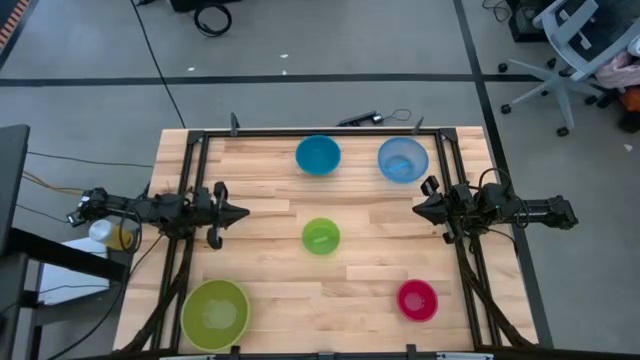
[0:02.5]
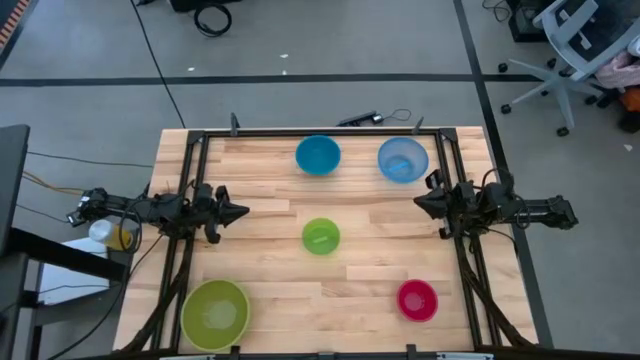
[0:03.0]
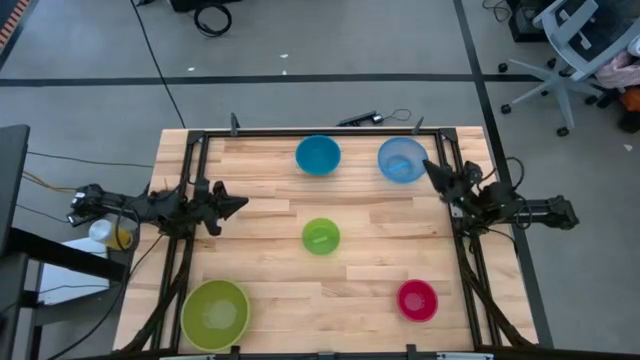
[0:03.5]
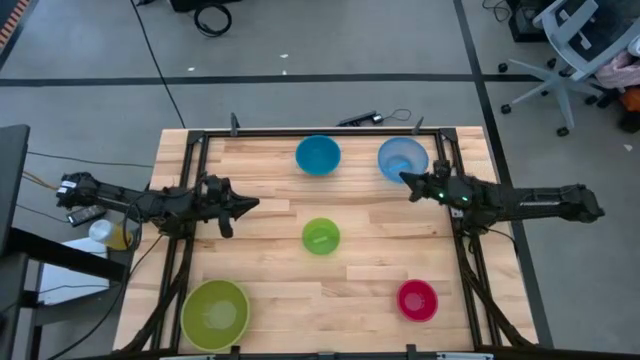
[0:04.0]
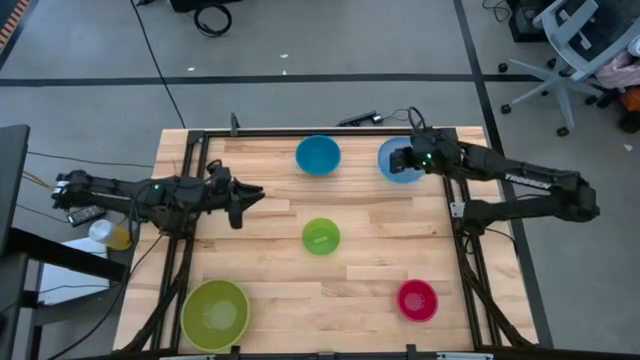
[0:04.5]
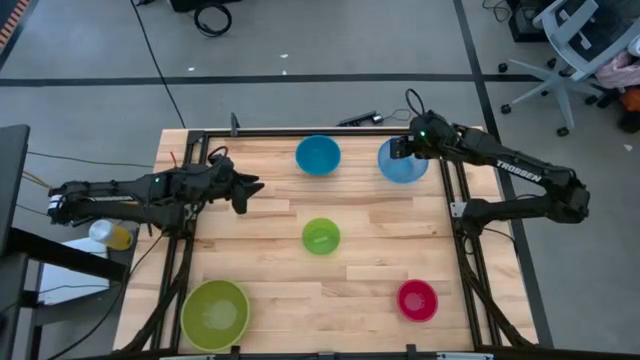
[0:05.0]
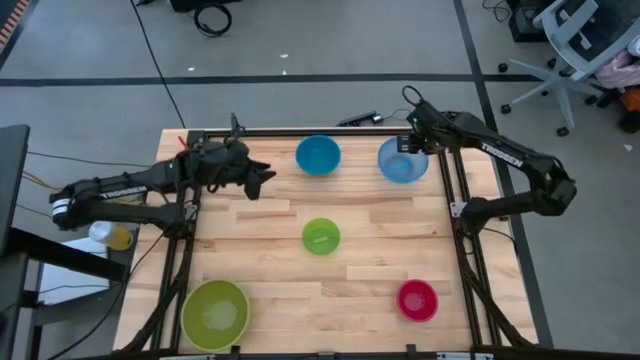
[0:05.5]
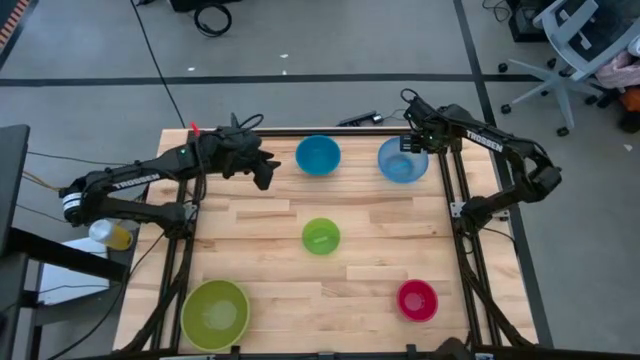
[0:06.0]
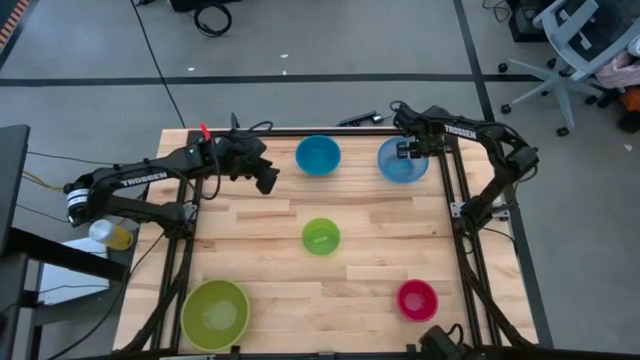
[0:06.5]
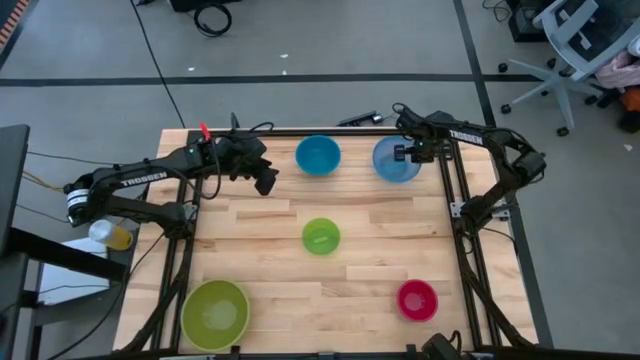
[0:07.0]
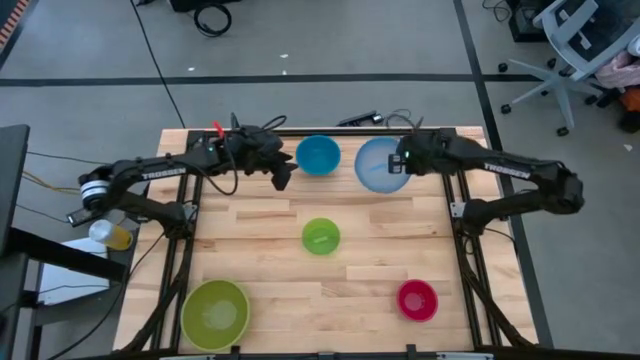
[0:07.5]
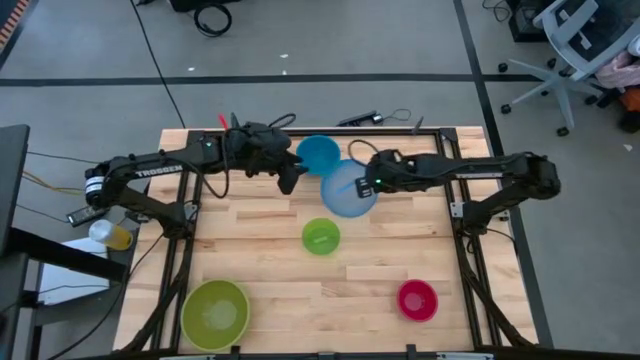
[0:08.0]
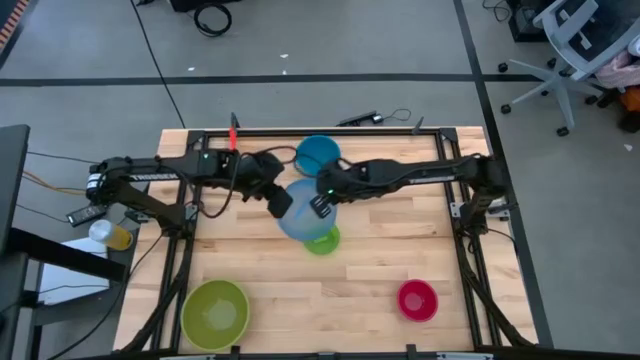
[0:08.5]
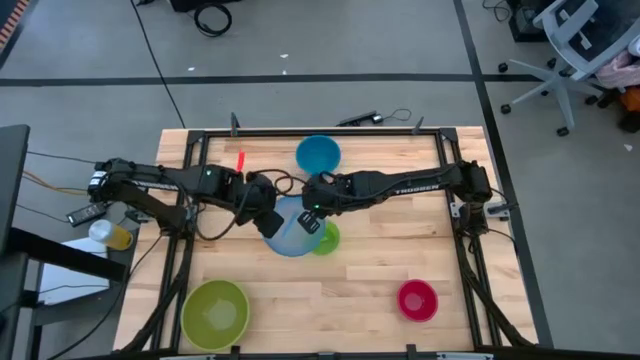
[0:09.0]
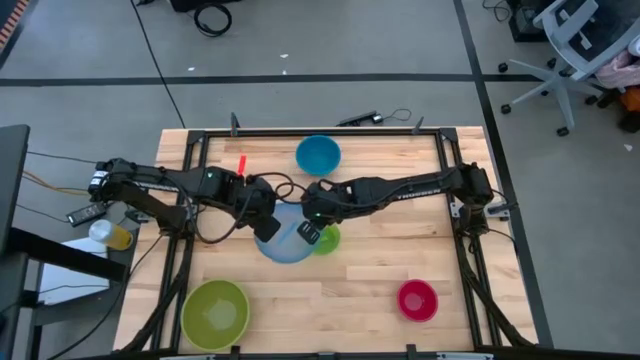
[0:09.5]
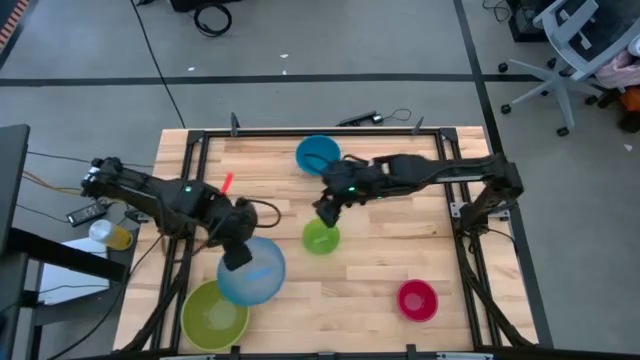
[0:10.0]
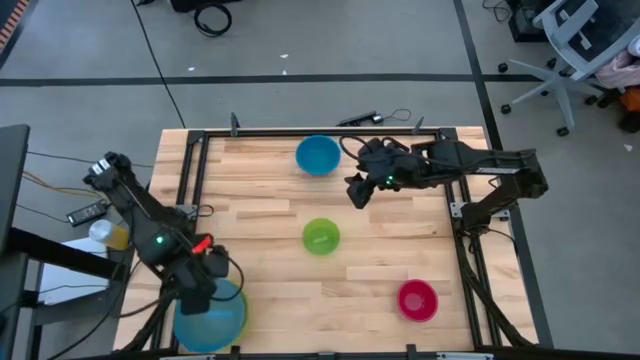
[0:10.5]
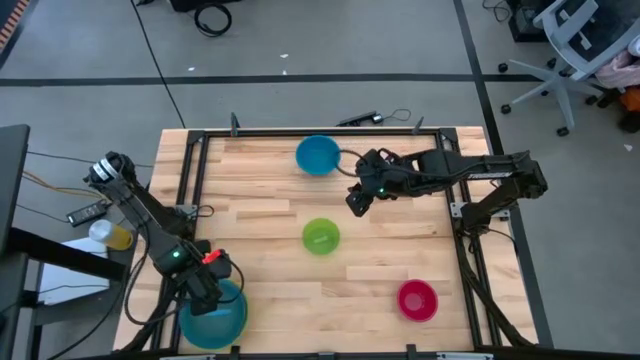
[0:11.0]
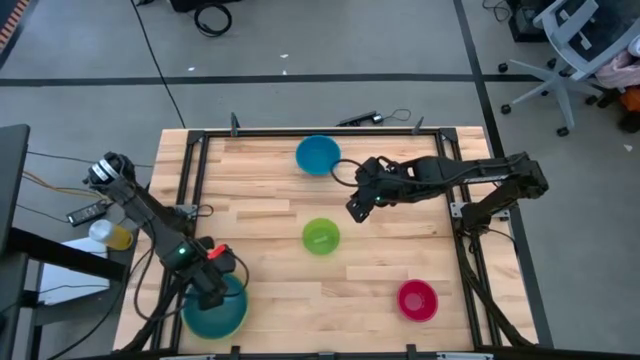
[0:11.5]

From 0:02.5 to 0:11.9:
Stack the light blue bowl on top of the green bowl

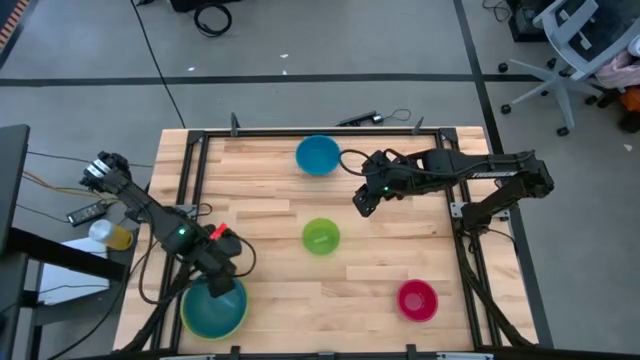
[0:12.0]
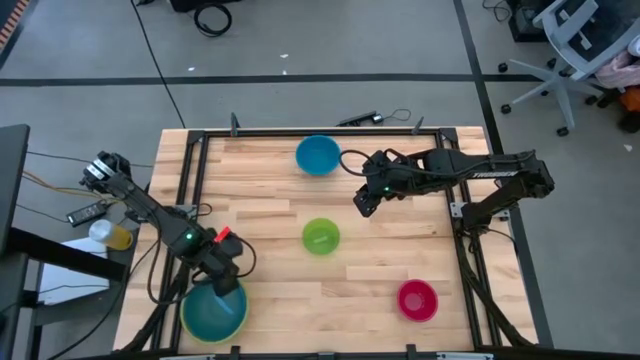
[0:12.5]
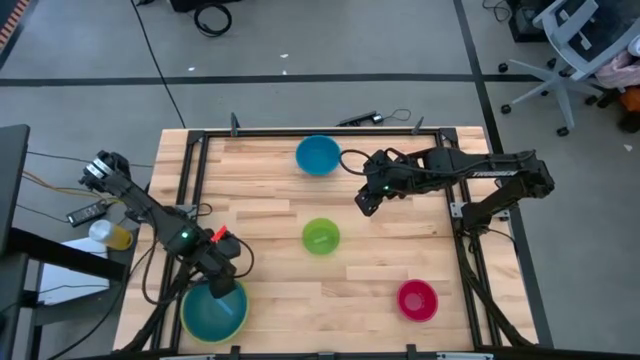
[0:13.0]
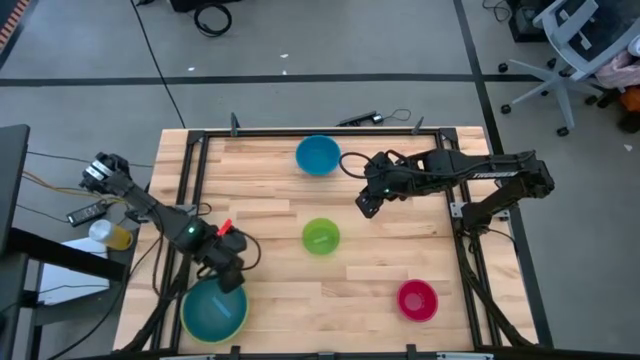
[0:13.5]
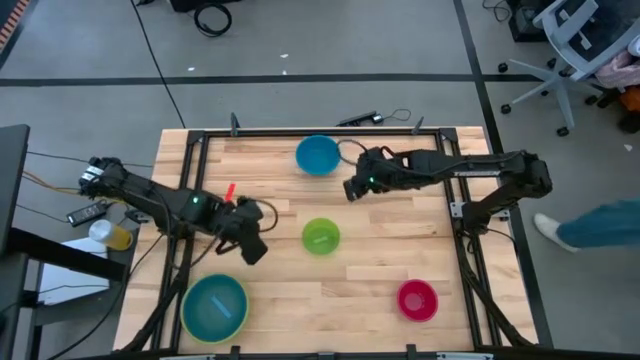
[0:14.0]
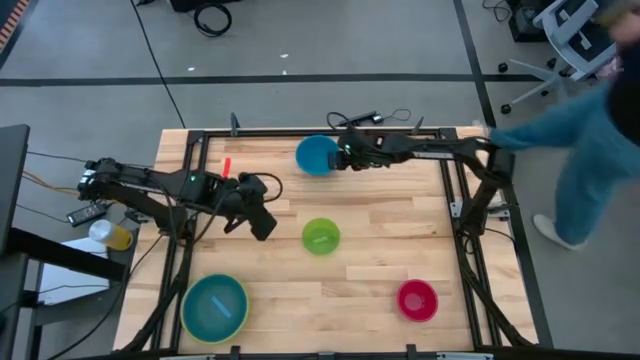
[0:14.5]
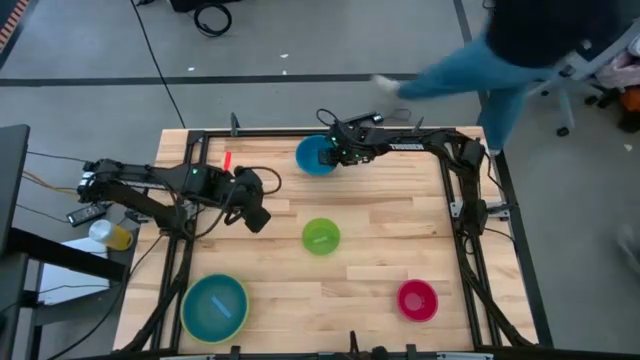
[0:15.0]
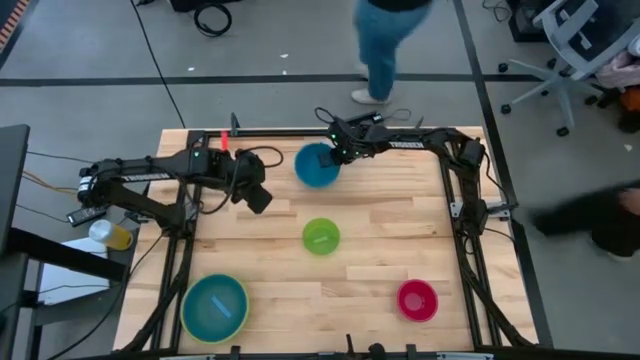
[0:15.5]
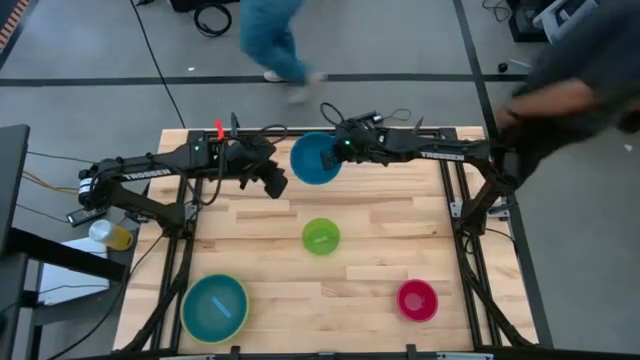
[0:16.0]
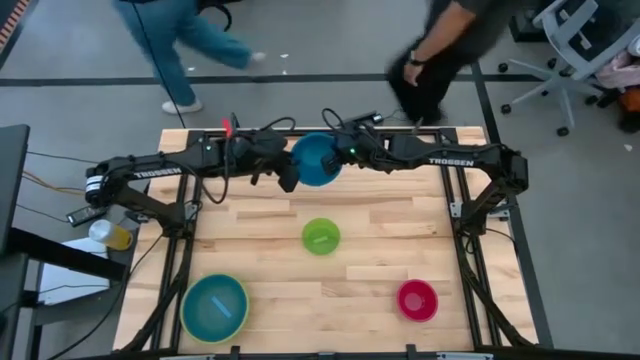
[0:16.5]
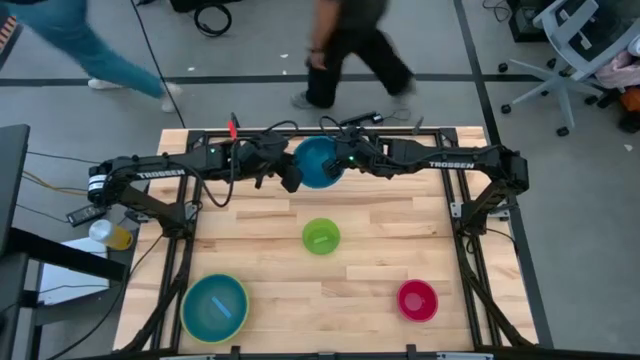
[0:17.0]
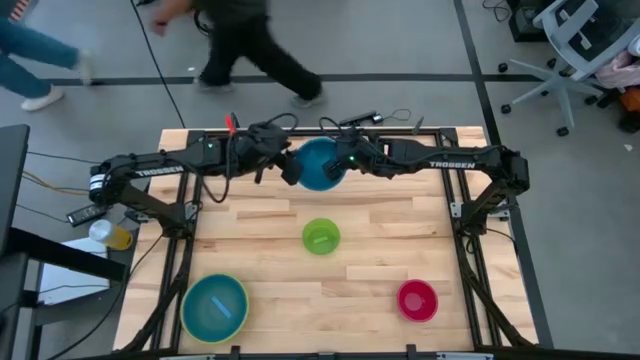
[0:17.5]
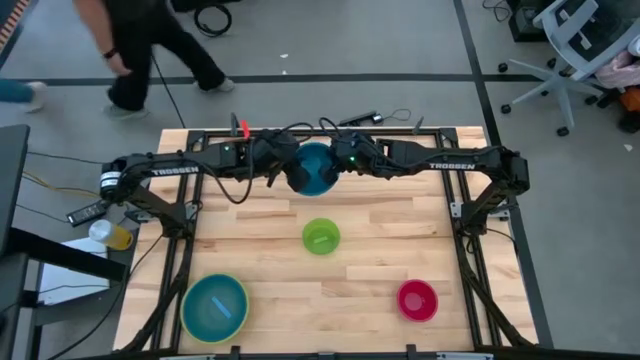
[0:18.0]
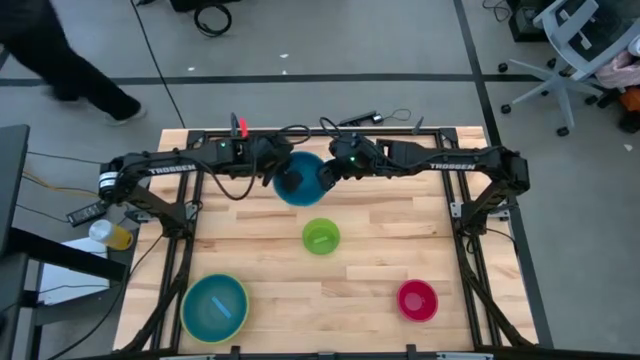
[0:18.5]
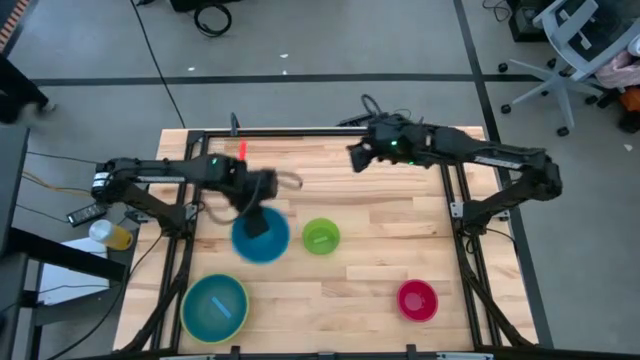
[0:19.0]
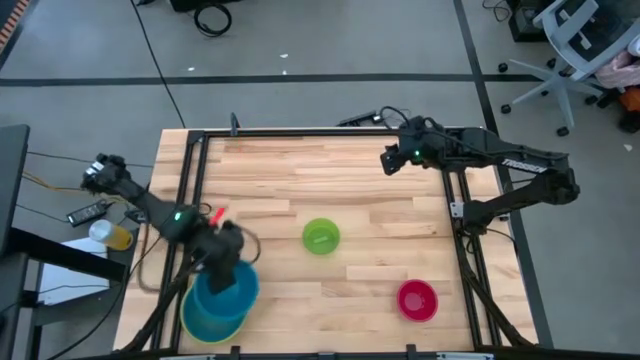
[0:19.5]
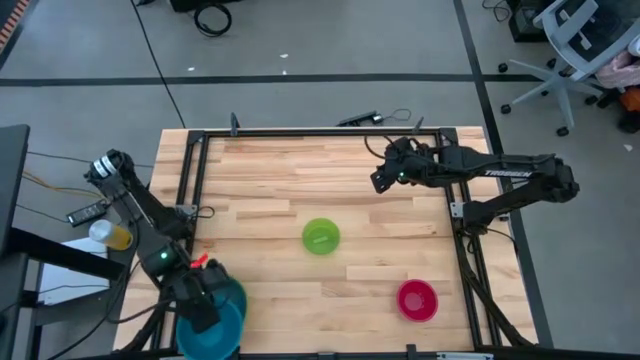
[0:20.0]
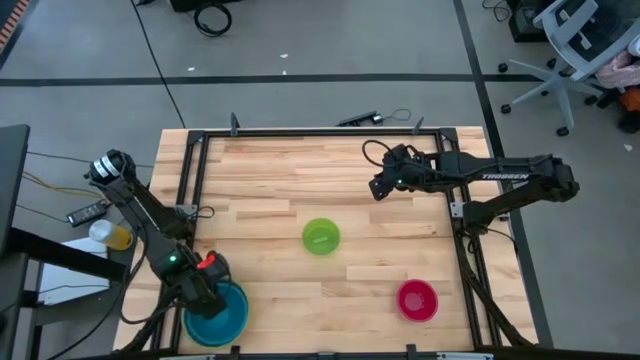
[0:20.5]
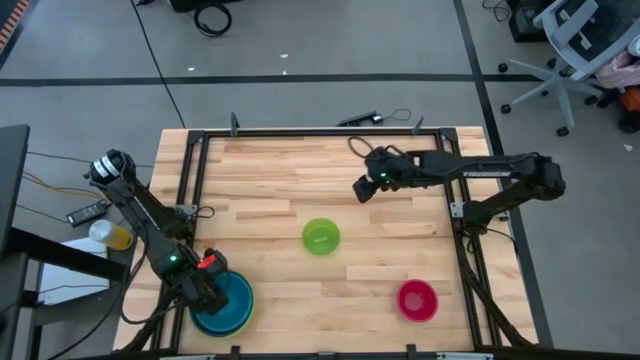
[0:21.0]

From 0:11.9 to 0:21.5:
Stack the blue bowl on top of the light blue bowl
